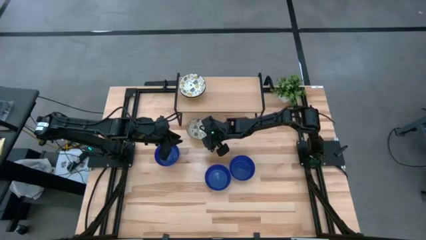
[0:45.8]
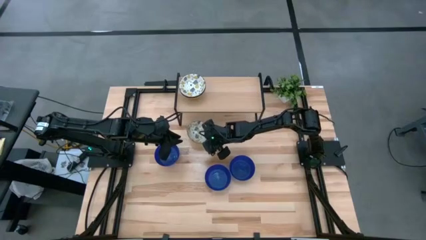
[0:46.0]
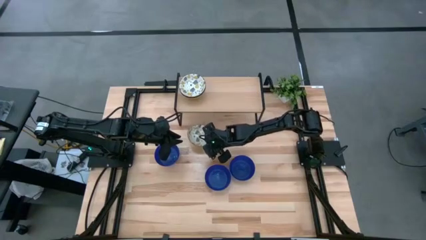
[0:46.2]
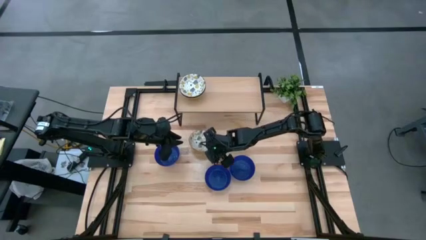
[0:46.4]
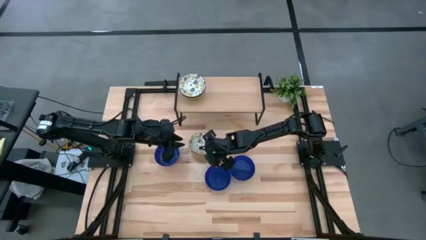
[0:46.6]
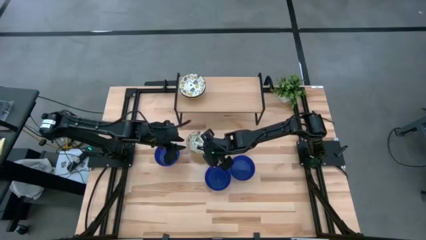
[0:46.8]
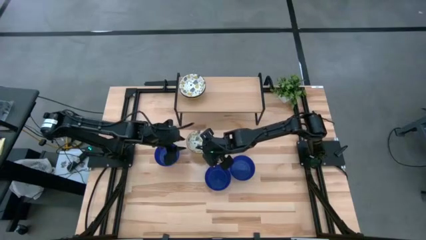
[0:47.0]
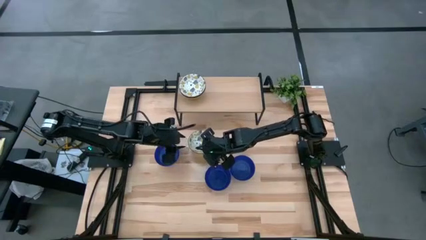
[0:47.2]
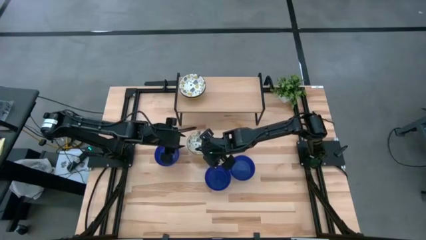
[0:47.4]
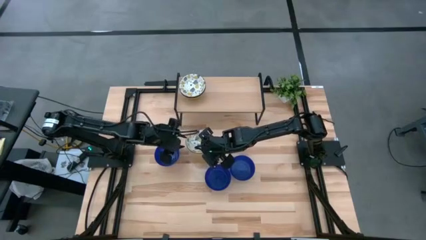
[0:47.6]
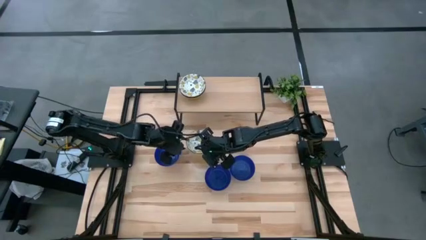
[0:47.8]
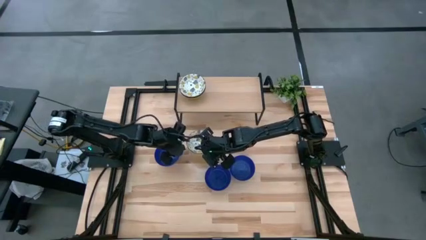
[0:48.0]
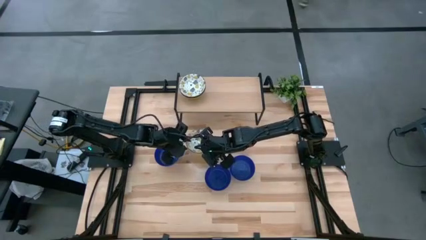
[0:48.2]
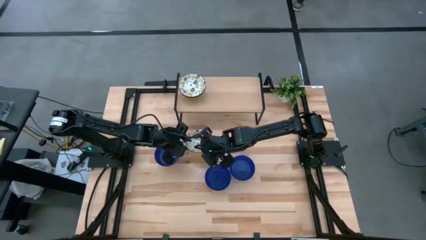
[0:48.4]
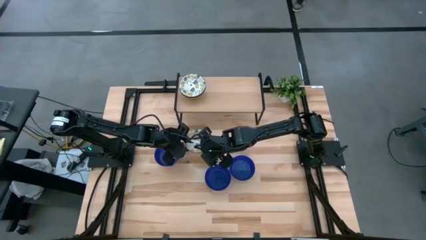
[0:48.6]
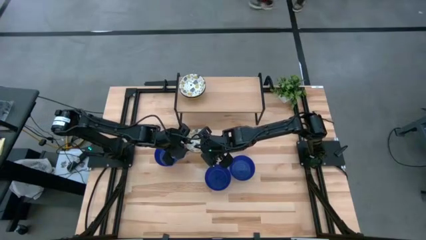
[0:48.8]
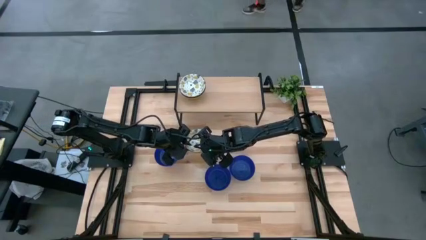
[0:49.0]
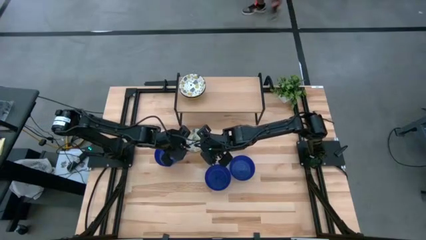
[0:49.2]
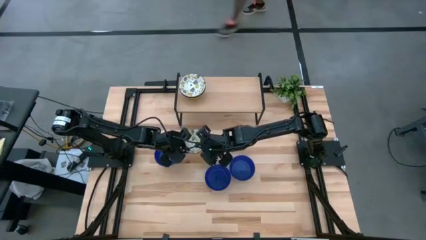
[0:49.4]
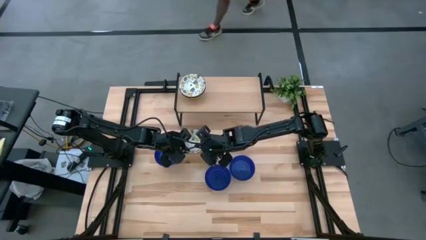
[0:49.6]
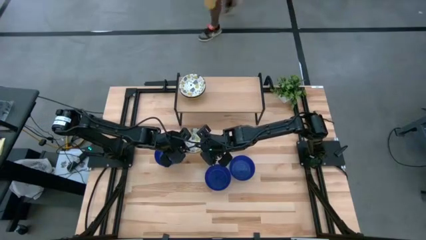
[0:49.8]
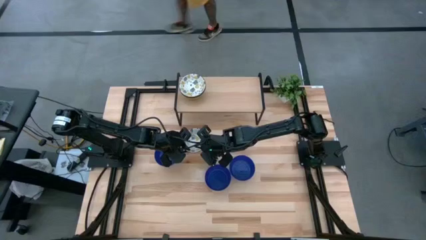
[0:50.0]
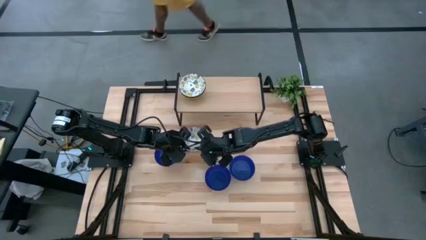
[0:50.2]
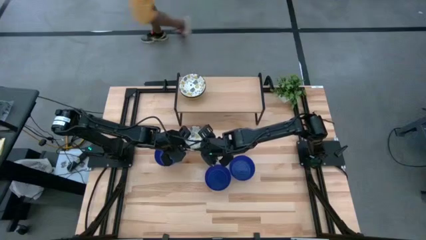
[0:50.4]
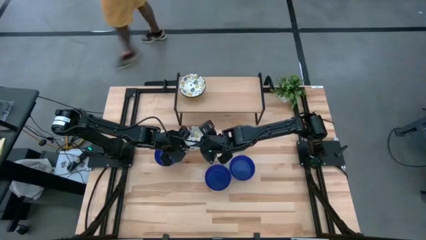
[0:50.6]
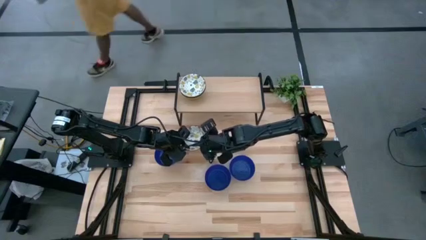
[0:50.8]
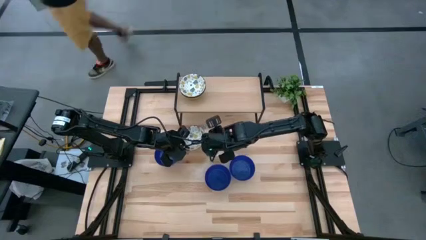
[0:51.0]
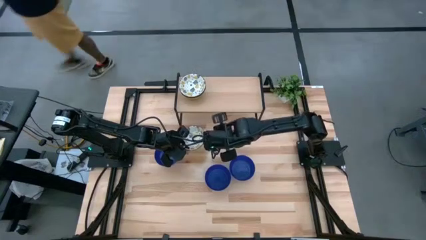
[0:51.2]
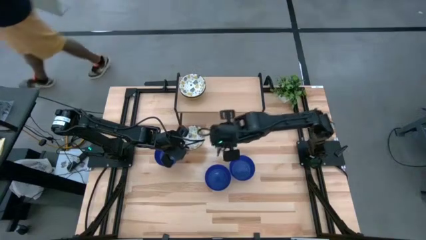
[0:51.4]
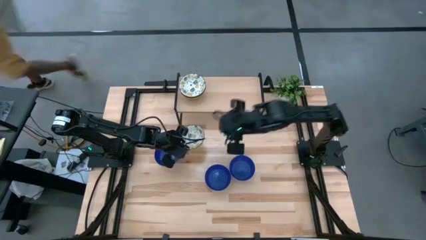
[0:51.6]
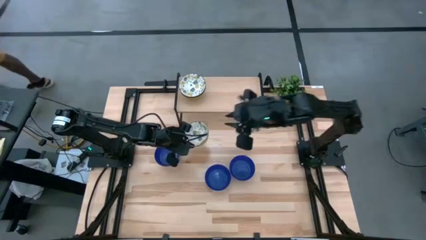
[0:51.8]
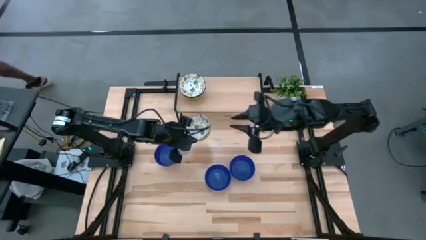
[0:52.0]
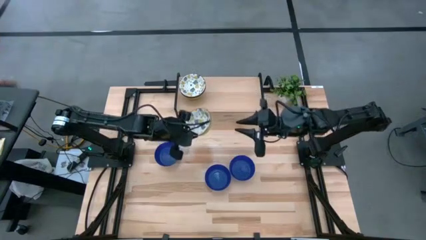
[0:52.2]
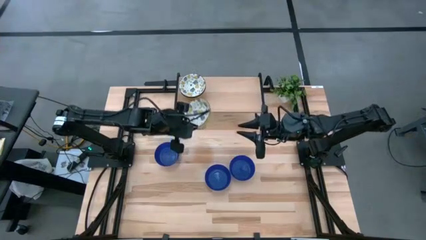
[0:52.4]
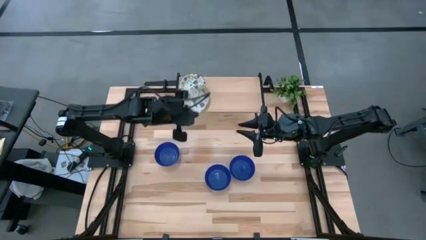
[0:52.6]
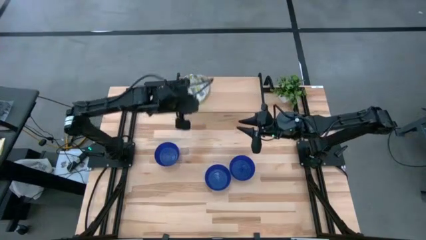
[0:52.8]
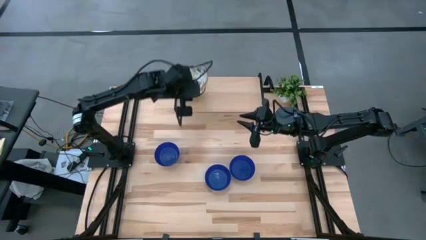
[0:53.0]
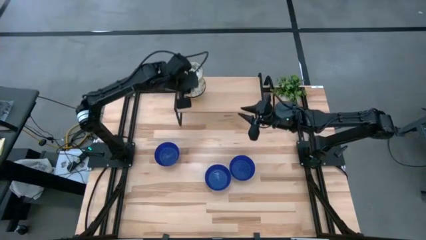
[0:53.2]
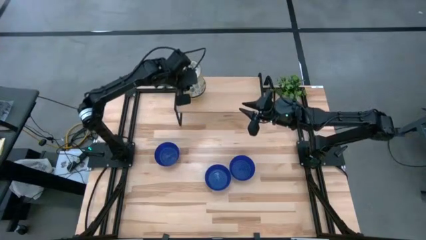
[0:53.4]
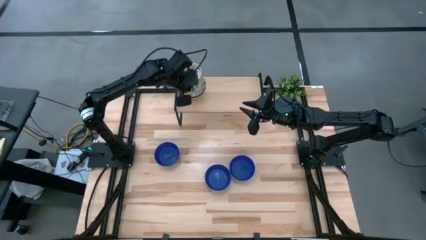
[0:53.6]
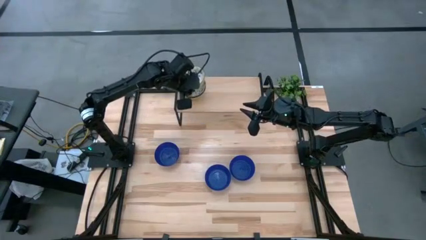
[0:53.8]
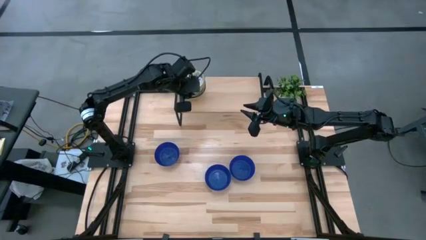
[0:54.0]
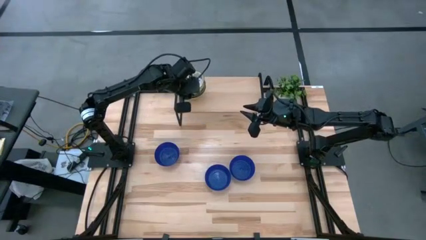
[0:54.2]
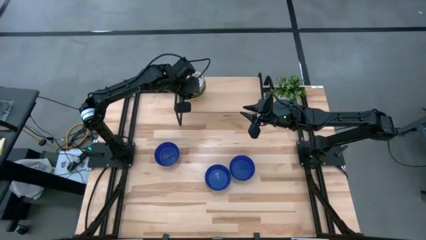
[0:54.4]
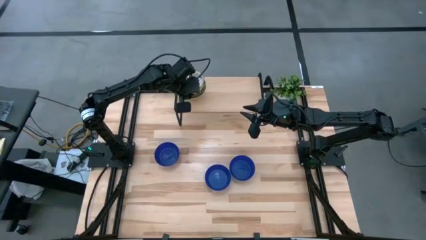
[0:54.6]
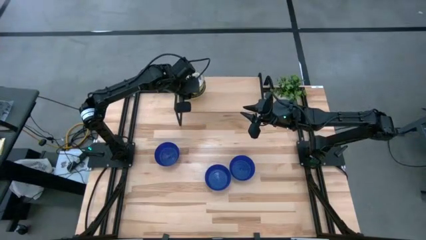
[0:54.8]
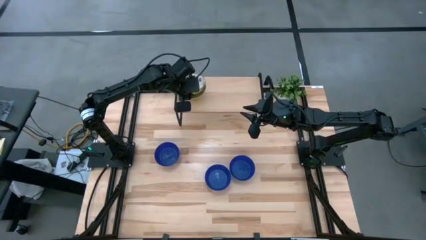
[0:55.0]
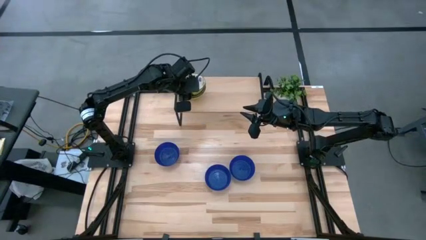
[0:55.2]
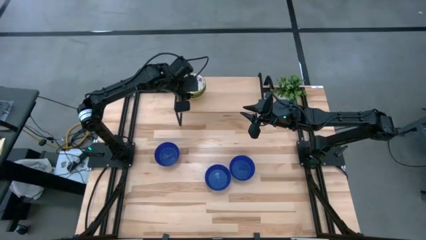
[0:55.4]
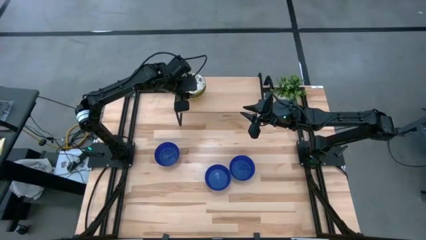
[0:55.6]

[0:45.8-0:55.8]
Task: Pick & Place Mini bowls
Stack the white patterned bowl on top of the white patterned bowl on the shelf
